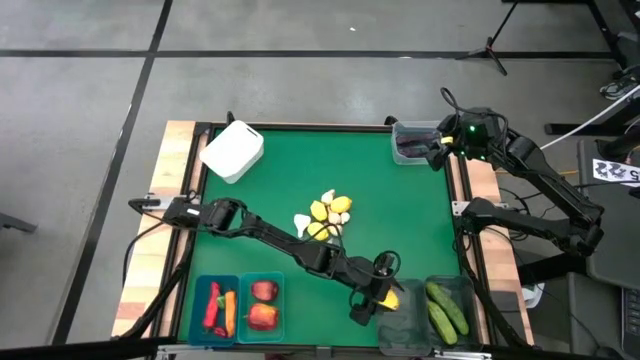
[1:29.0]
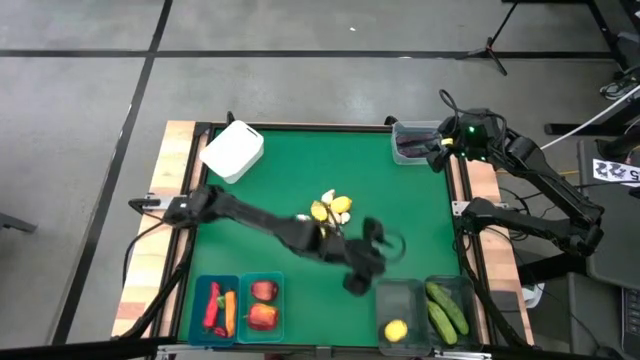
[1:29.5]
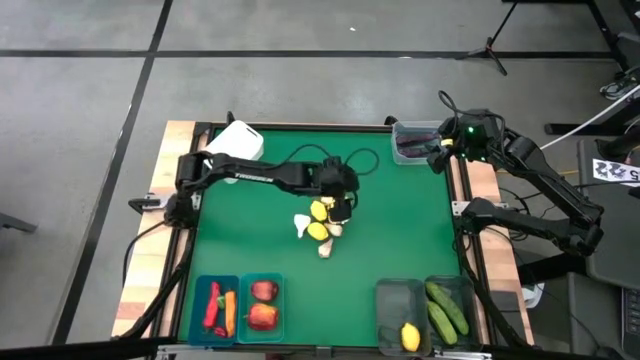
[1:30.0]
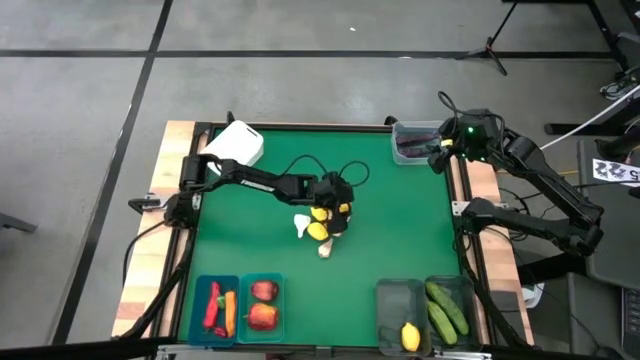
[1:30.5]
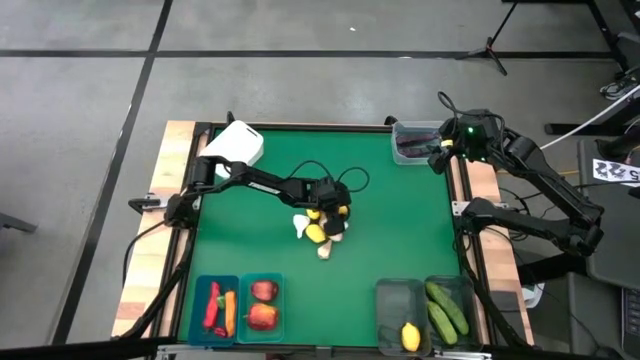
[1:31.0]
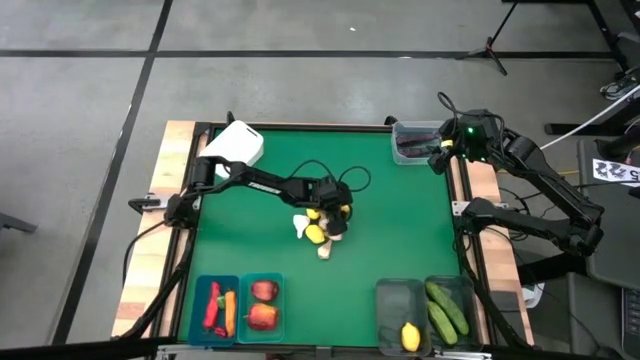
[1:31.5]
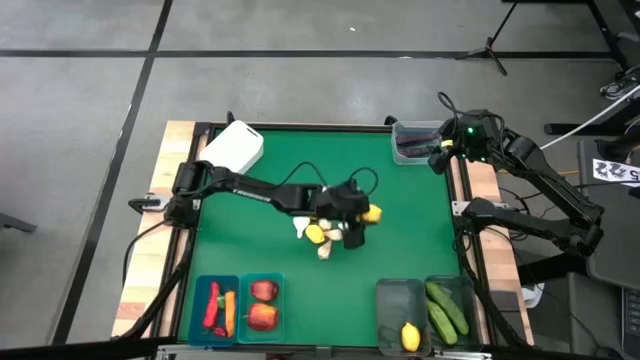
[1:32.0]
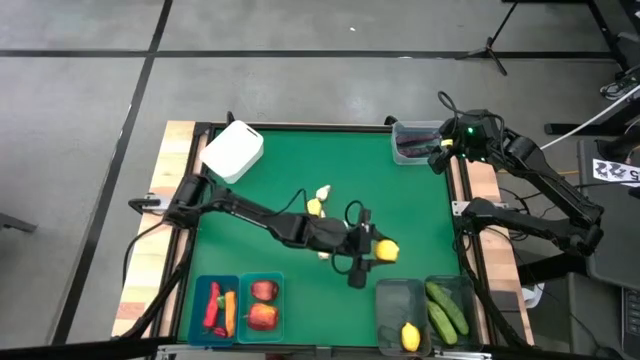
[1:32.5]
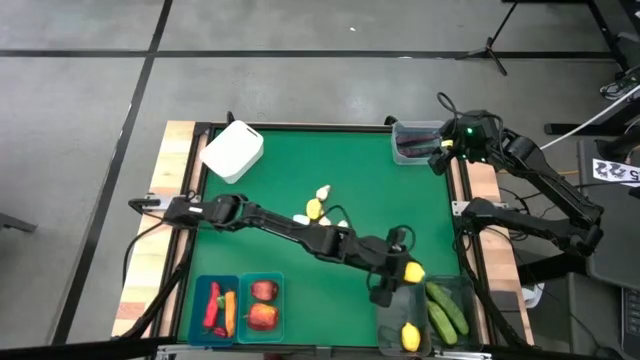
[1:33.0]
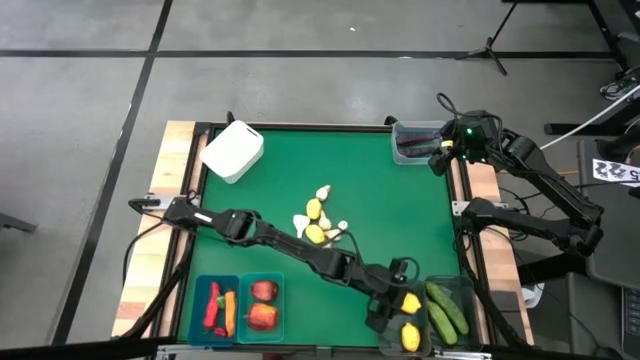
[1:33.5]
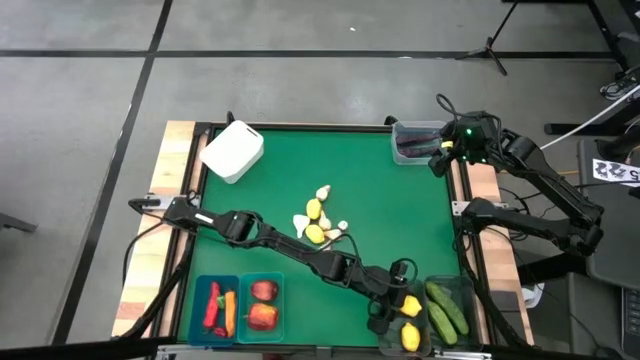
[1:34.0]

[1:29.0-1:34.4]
Task: Sort produce into baskets
Put the lemon into the left black bin

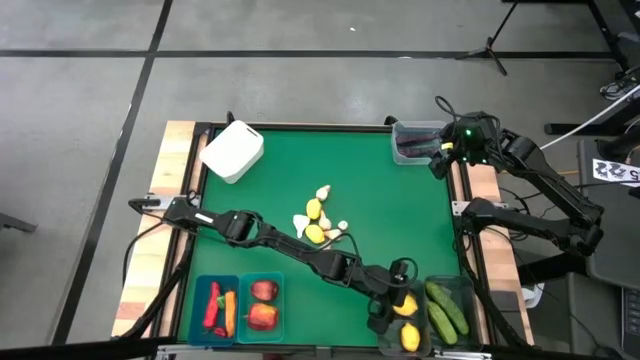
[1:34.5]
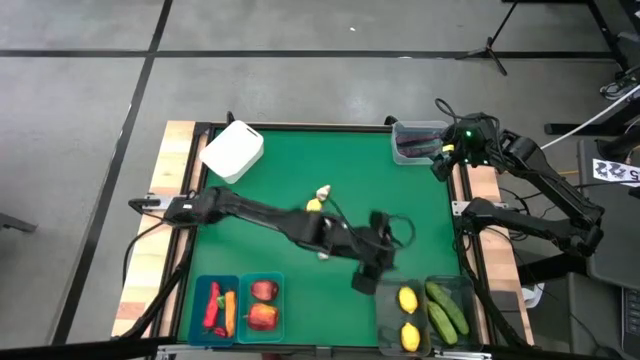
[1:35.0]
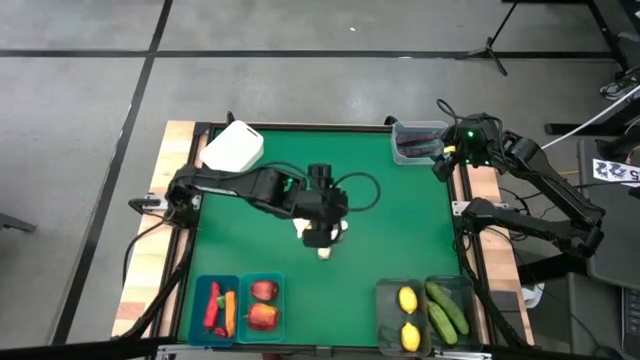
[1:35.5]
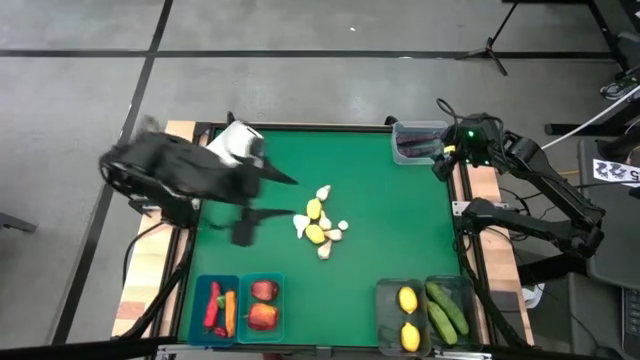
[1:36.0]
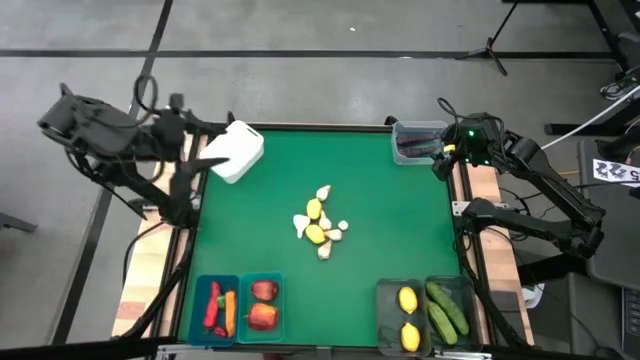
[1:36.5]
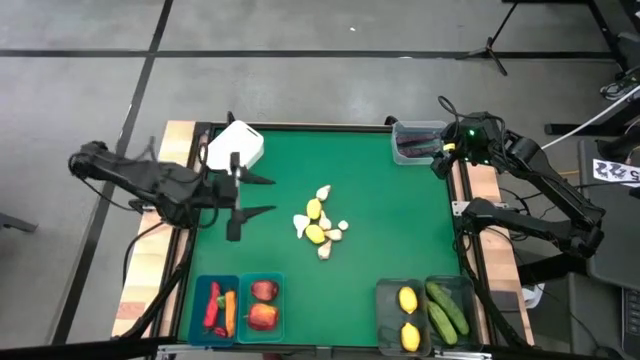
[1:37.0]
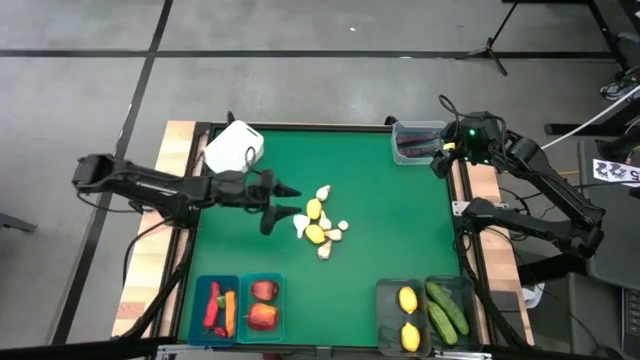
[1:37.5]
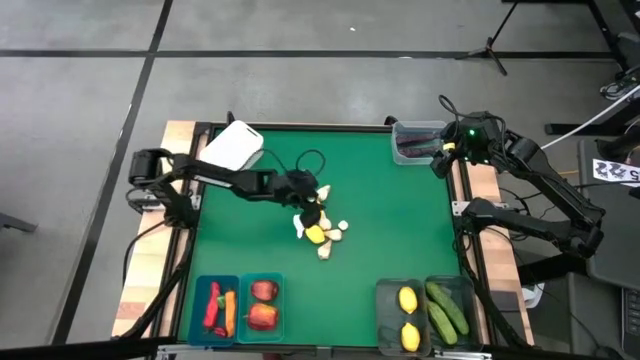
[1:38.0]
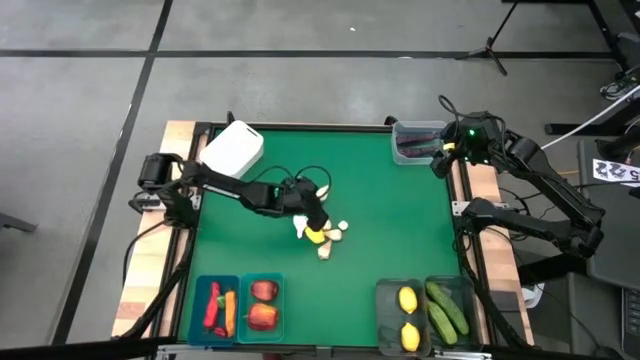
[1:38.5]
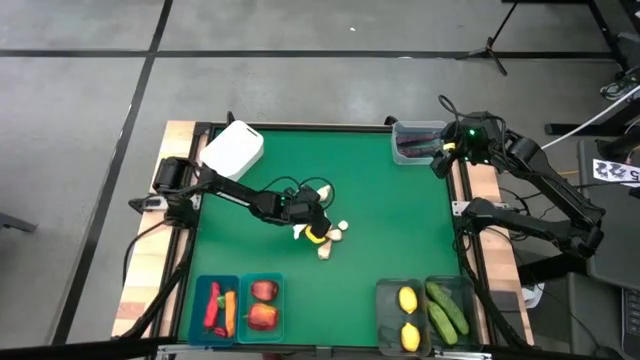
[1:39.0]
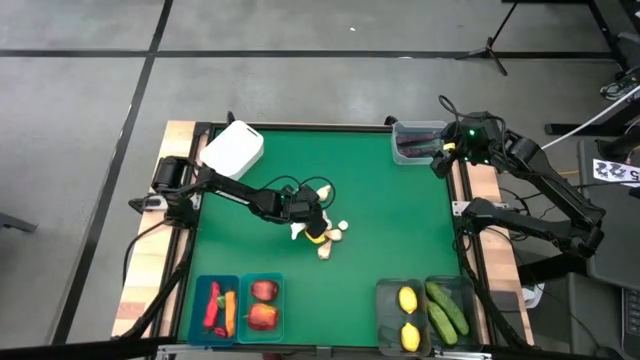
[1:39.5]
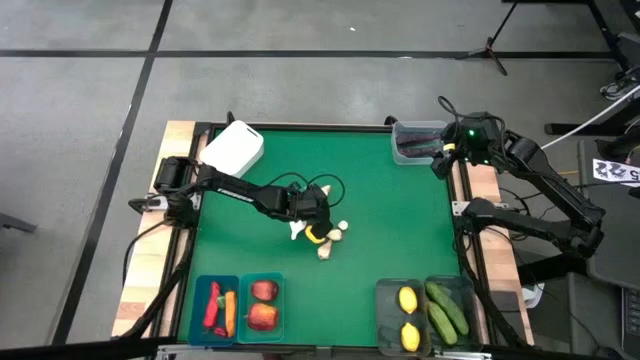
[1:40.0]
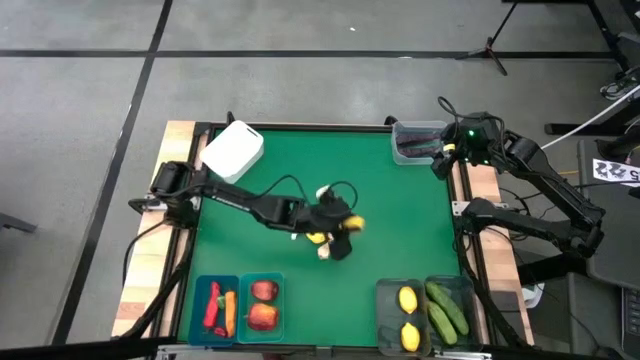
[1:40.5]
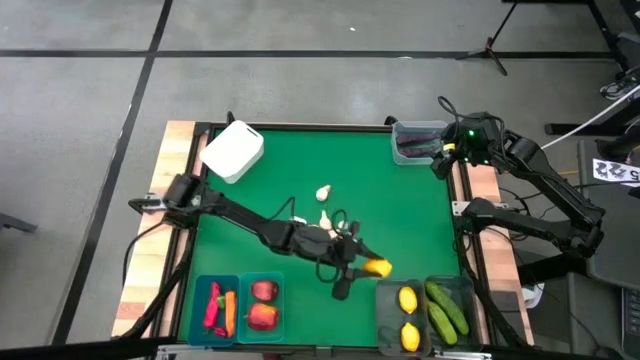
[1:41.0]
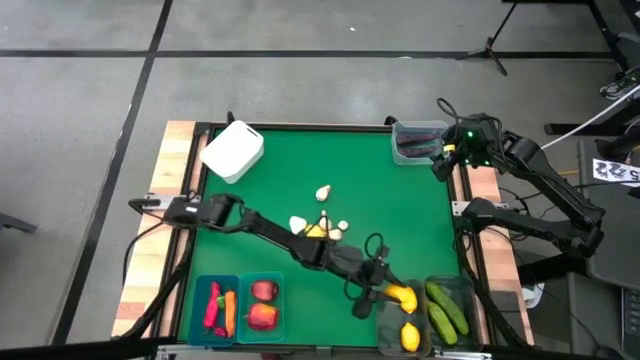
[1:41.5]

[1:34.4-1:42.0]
Put the lemon into the left black bin

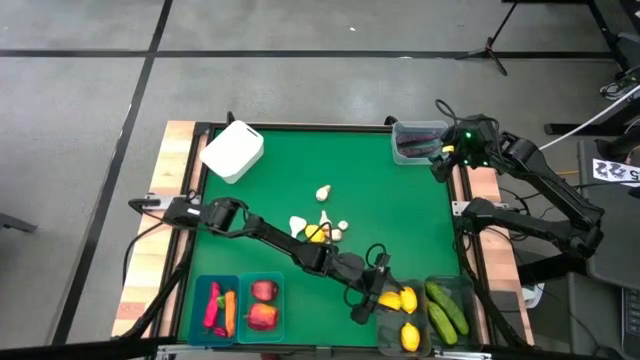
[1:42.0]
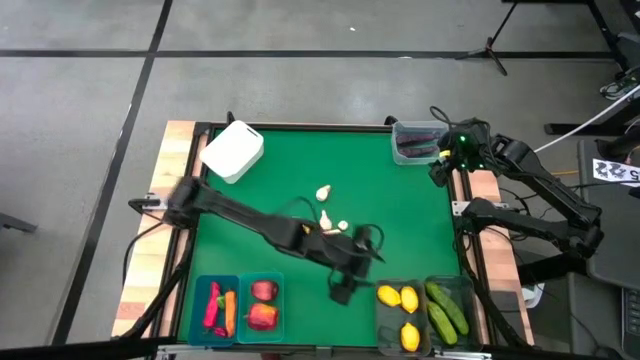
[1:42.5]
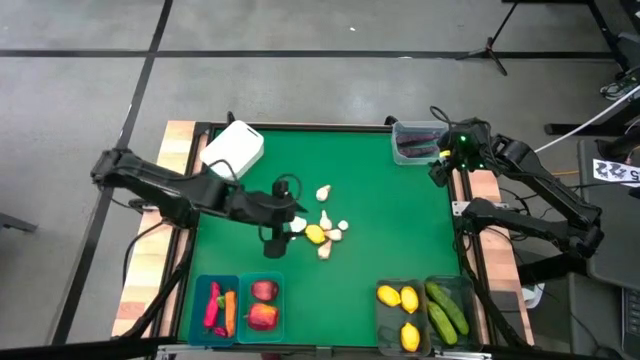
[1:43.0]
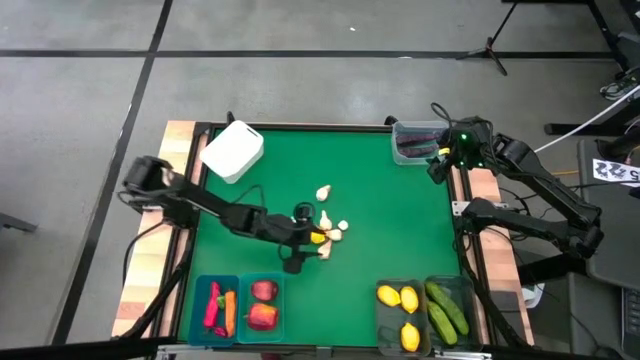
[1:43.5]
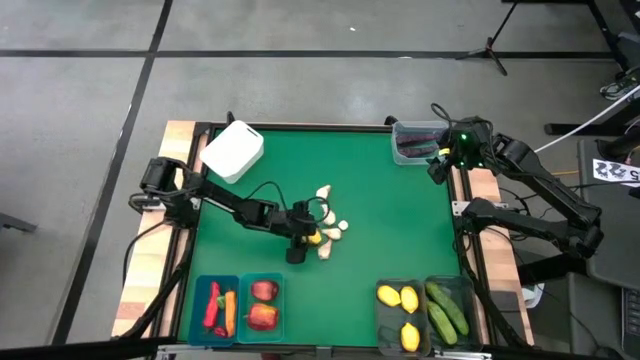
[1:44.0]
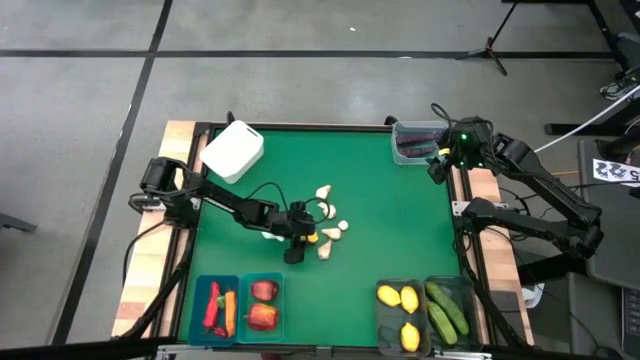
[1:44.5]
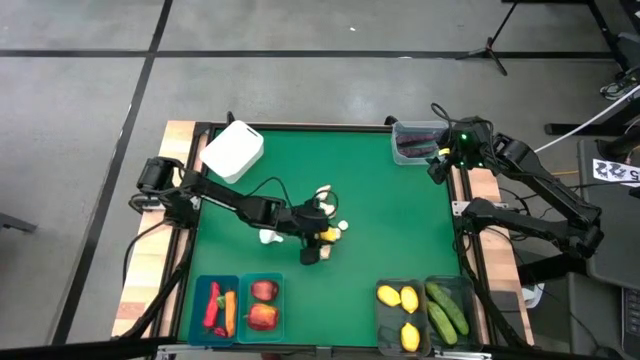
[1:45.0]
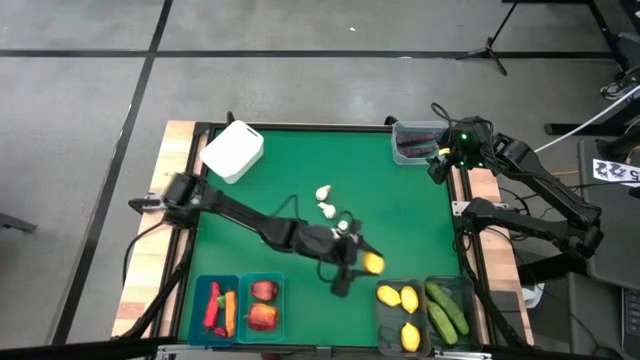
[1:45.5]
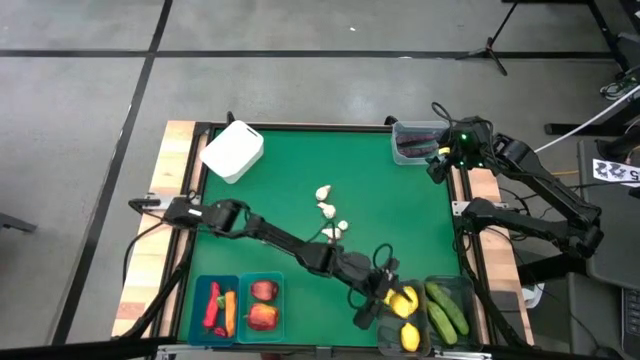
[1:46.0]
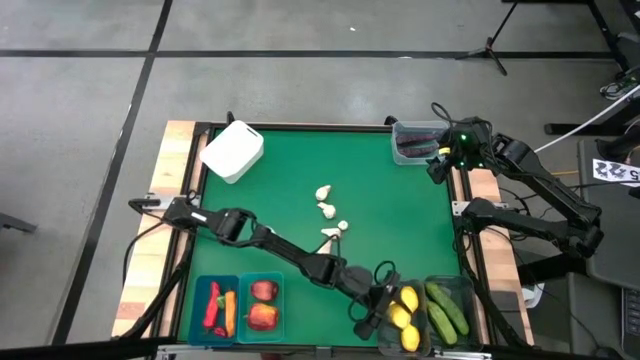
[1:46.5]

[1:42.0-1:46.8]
Put the lemon into the left black bin

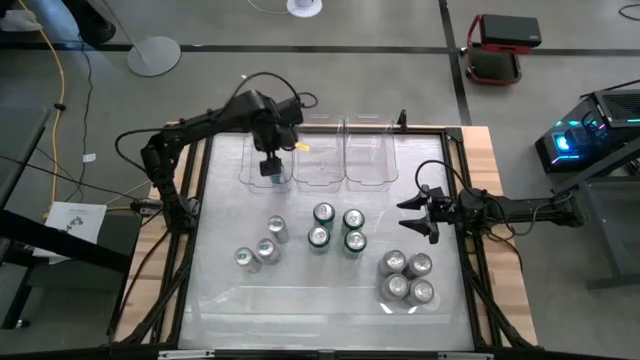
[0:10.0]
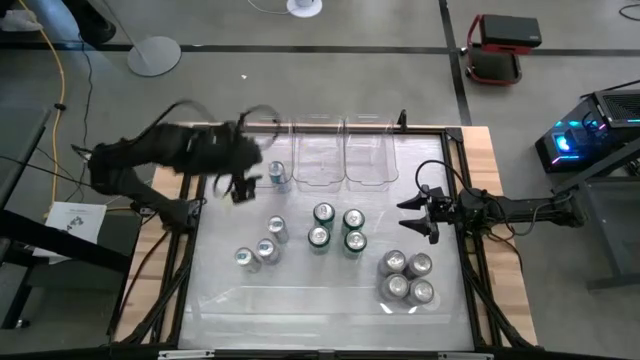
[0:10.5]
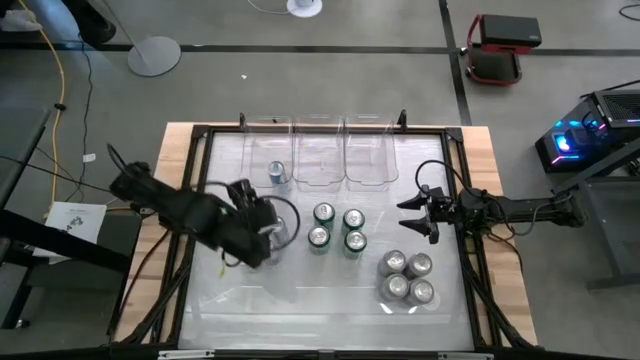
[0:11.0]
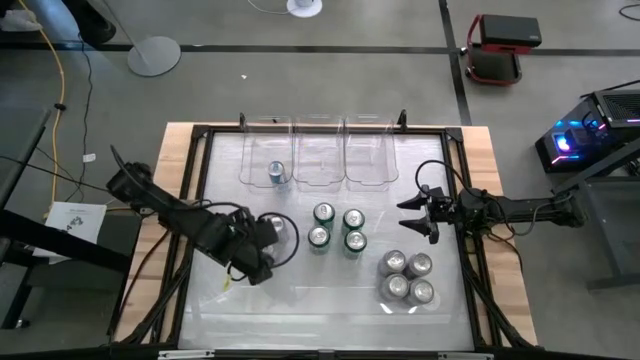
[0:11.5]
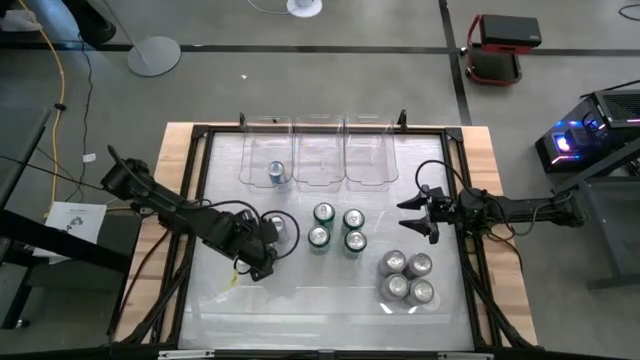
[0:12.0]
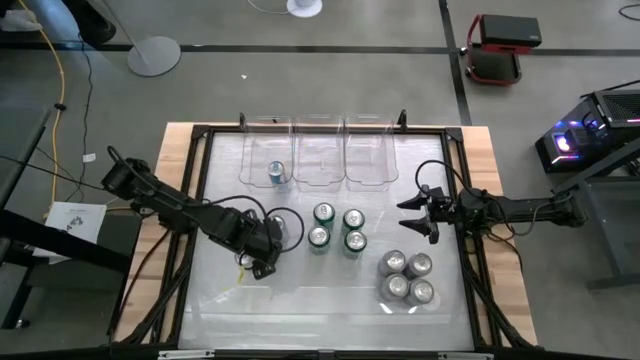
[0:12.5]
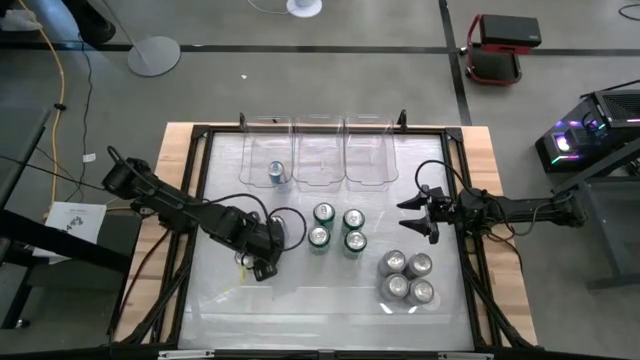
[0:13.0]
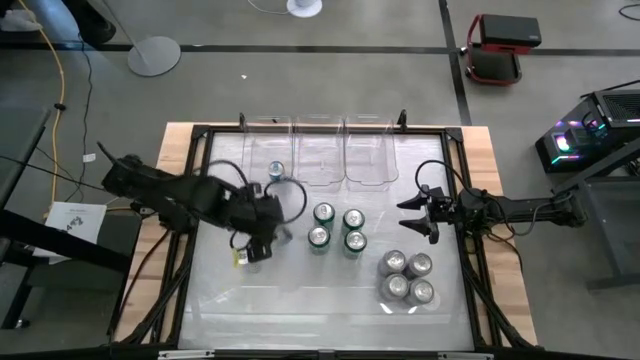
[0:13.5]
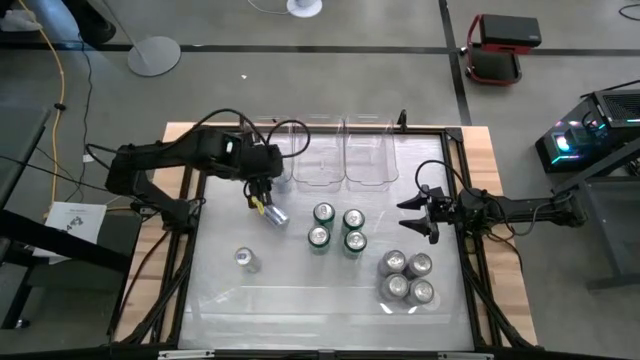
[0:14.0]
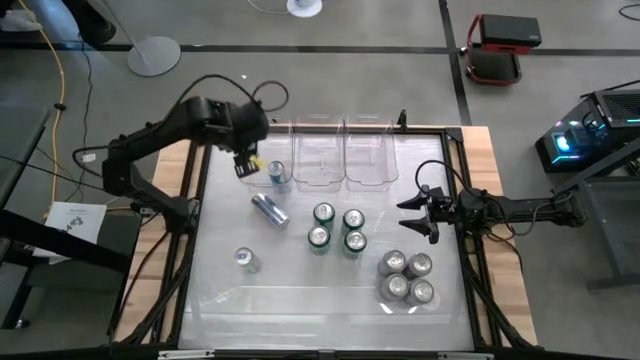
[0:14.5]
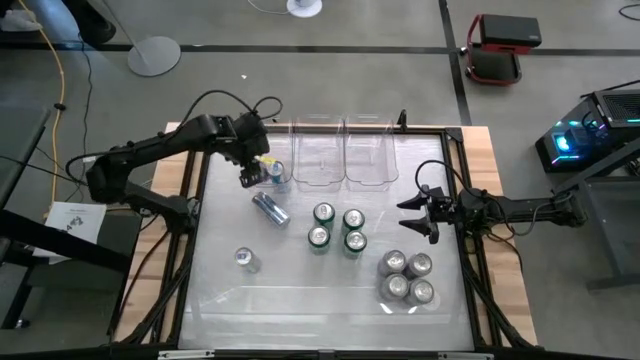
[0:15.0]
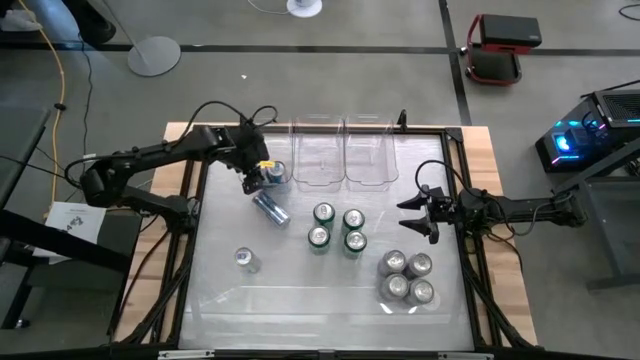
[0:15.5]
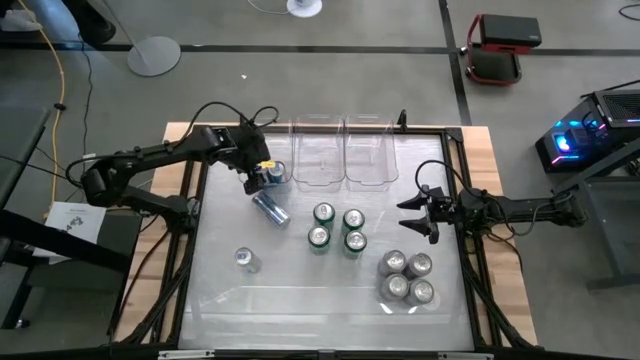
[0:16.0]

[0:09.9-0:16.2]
Task: Sort soda cans
Put the bottom right blue soda can into the left transparent bin
